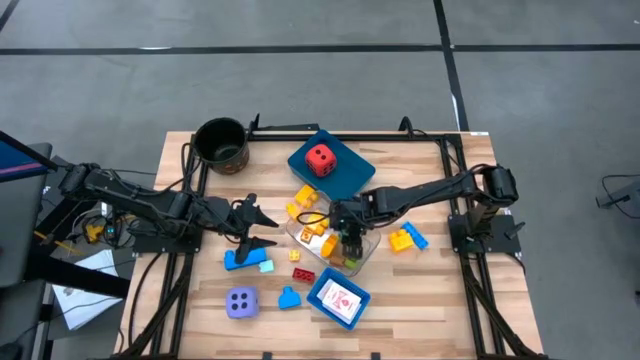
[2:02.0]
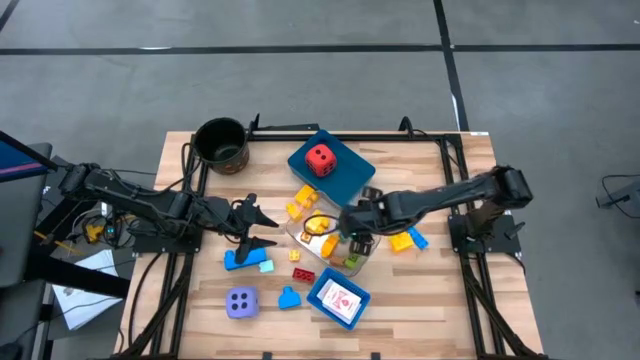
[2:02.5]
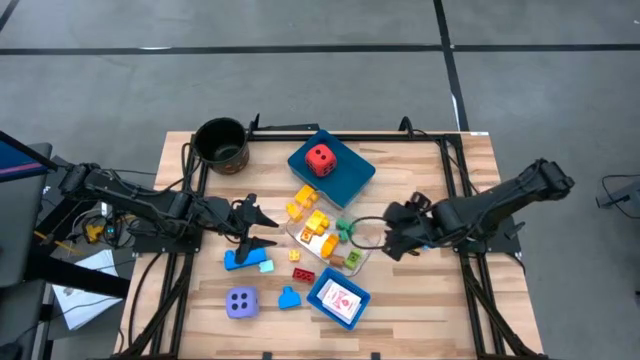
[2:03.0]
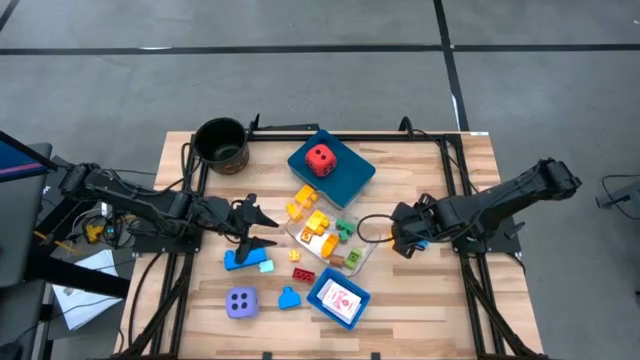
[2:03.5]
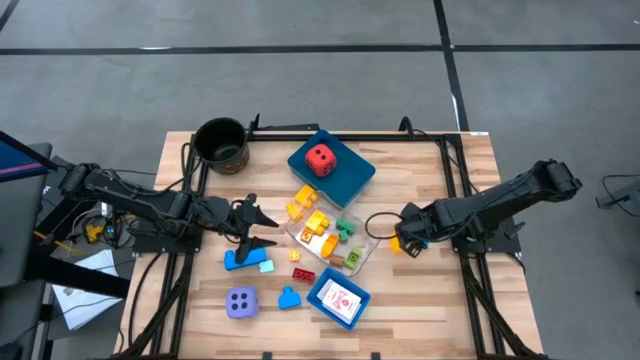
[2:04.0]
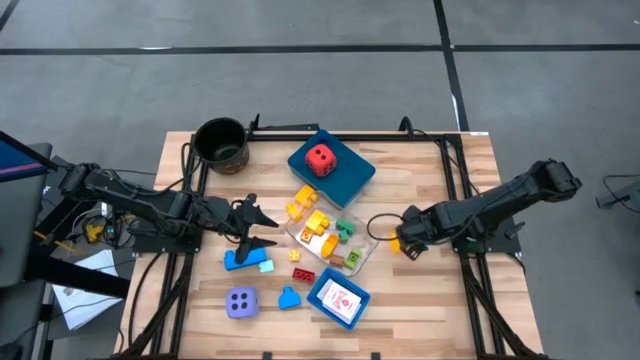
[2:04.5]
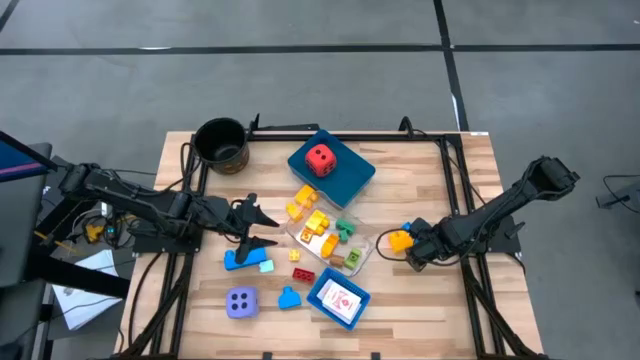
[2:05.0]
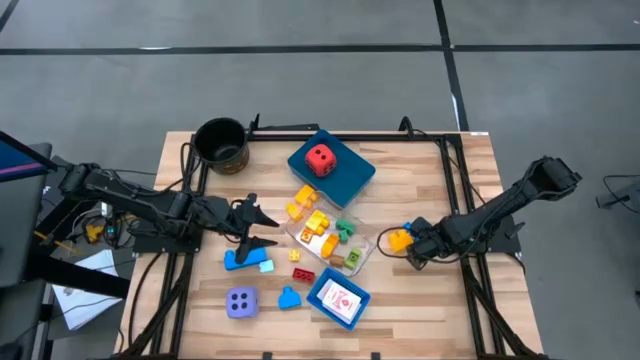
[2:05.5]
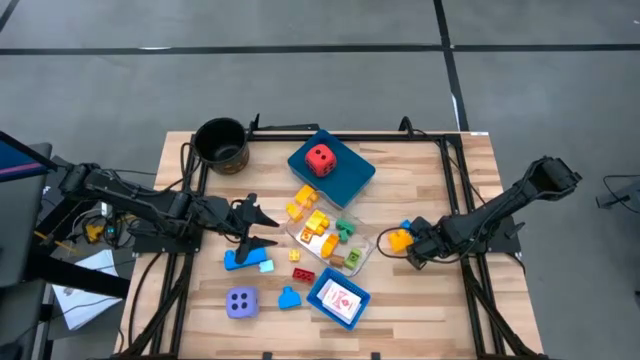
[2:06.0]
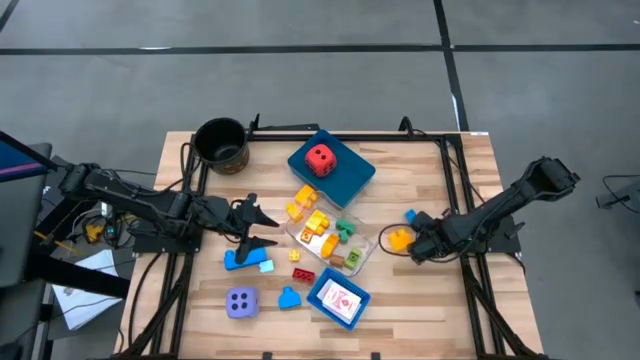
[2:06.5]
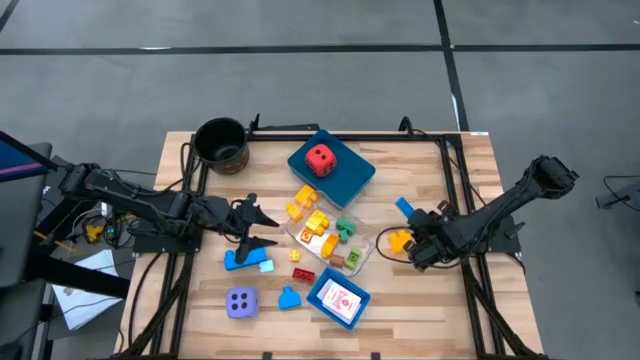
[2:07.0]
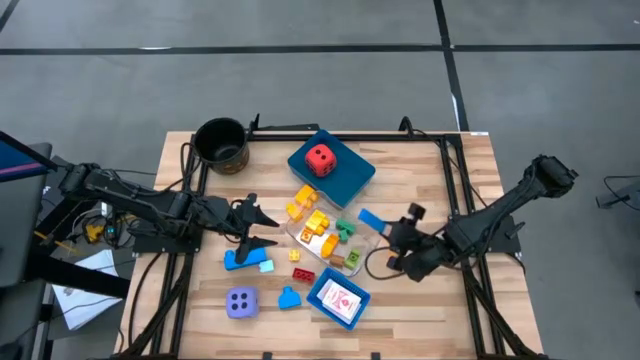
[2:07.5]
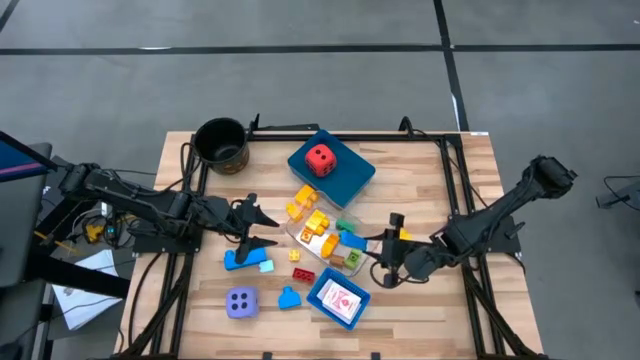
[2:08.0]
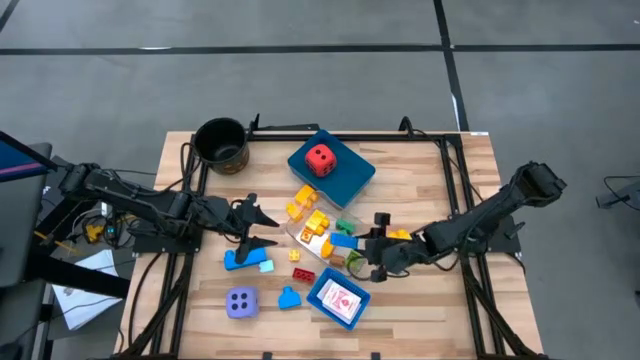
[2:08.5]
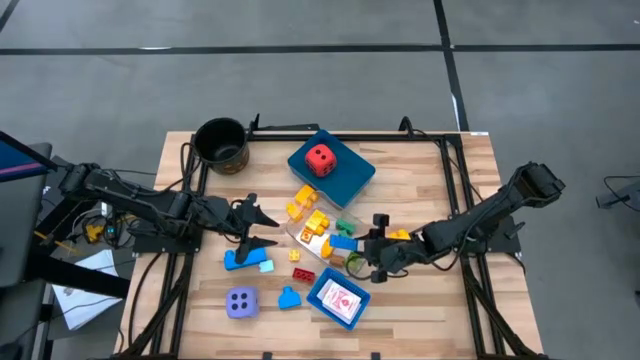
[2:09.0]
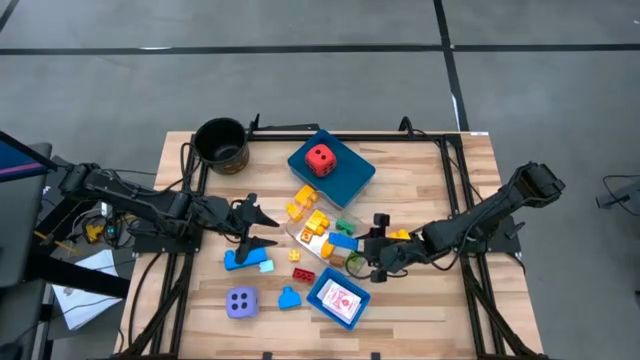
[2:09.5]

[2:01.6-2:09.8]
Task: Pick & Place Toys
Put the blue game piece block into the transparent bin

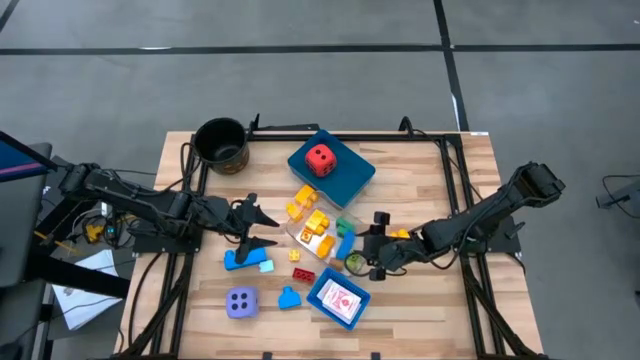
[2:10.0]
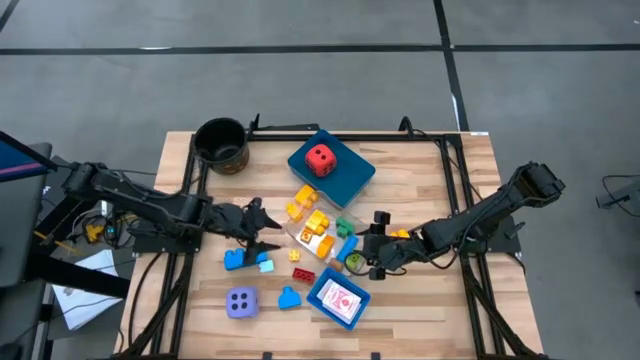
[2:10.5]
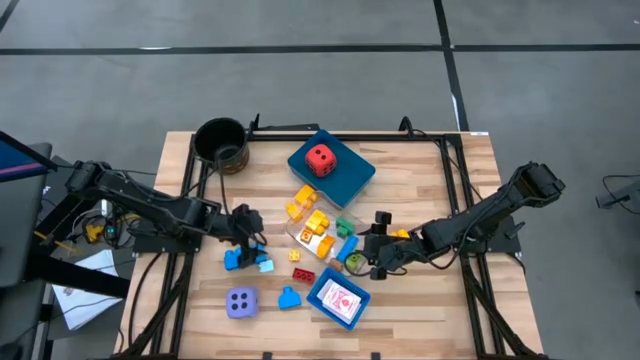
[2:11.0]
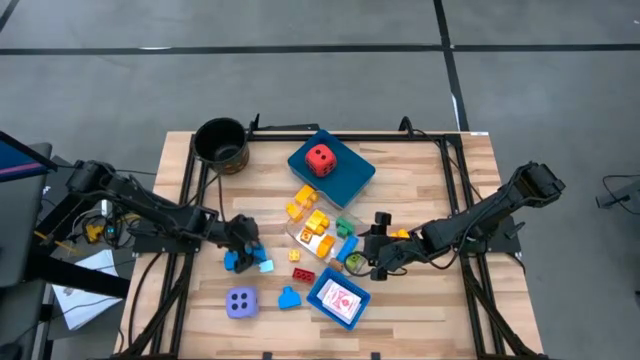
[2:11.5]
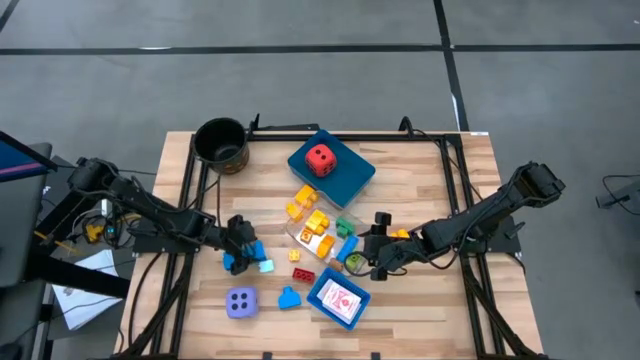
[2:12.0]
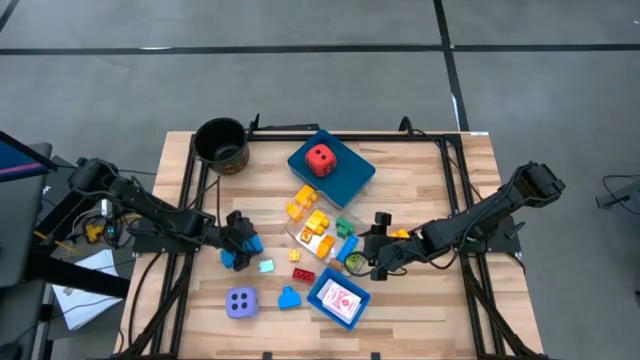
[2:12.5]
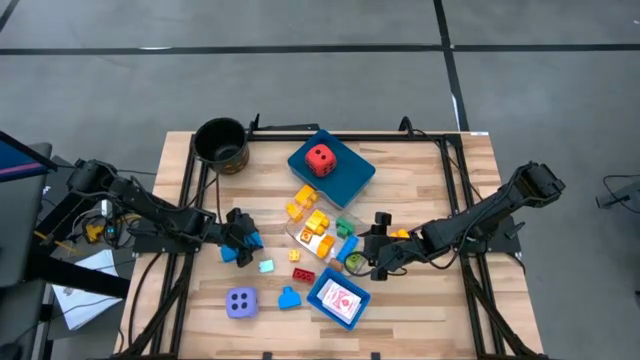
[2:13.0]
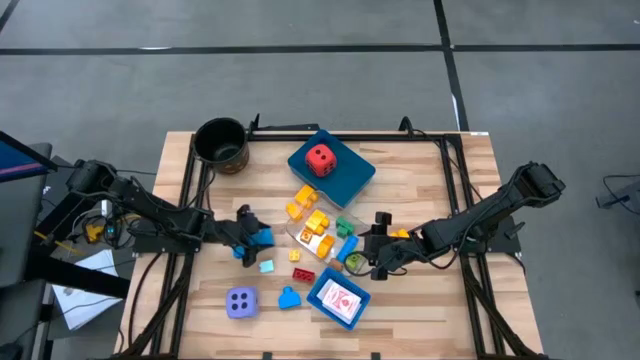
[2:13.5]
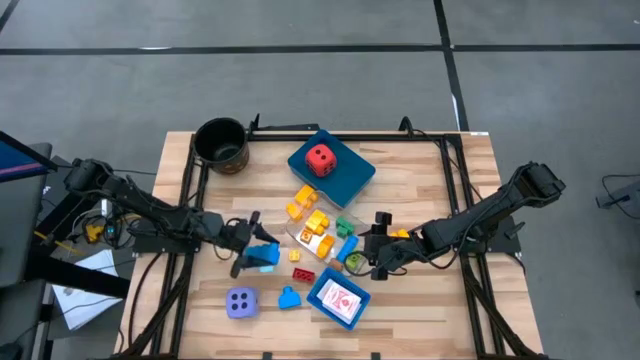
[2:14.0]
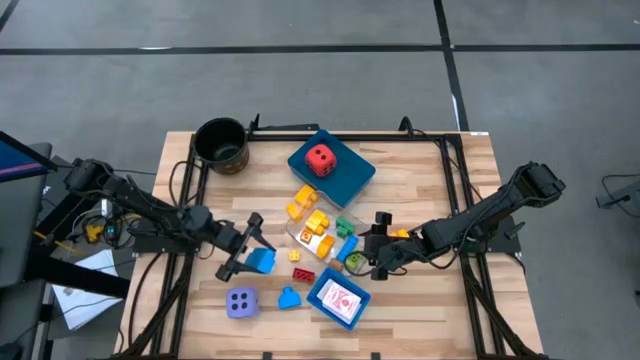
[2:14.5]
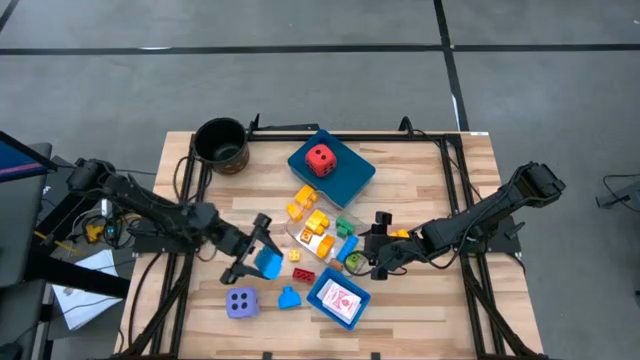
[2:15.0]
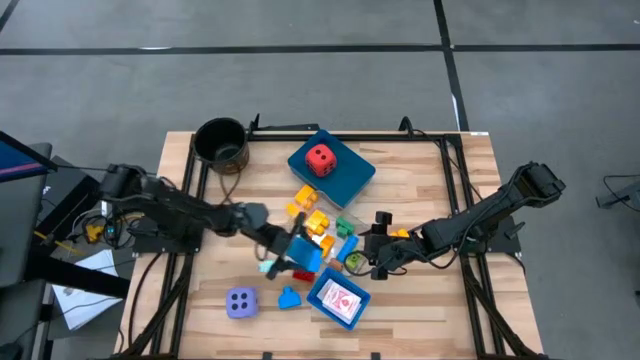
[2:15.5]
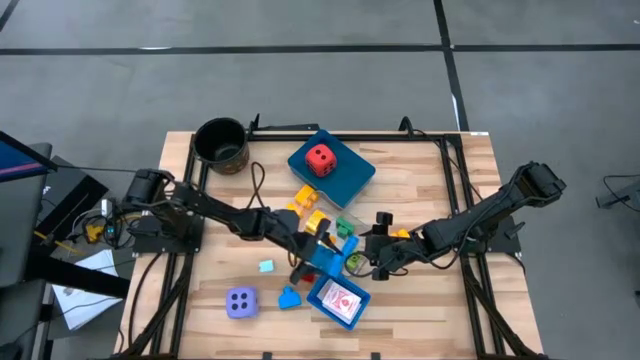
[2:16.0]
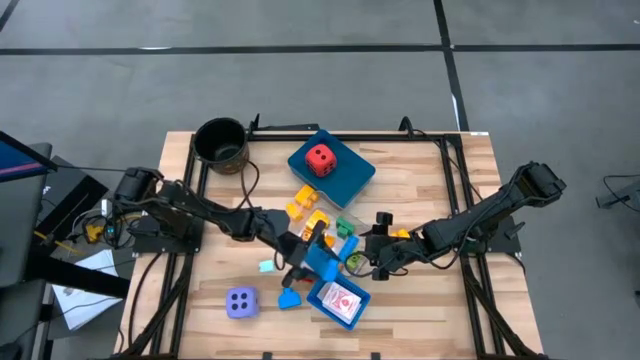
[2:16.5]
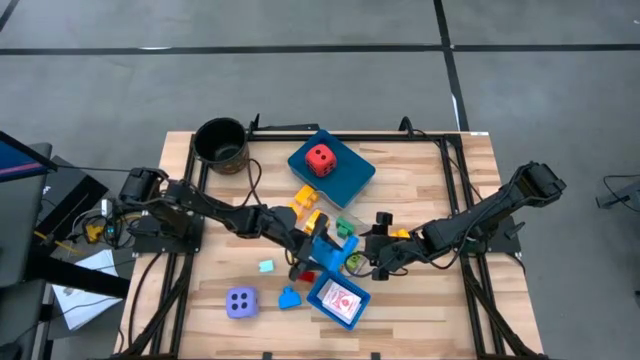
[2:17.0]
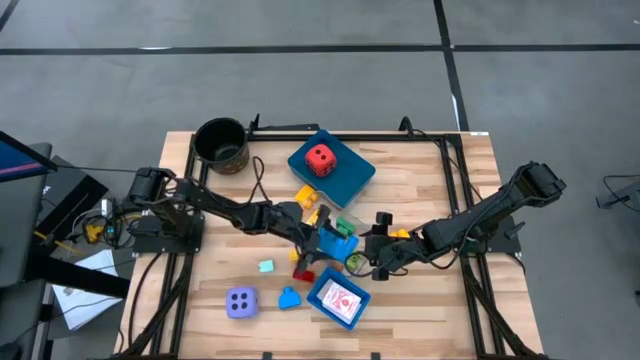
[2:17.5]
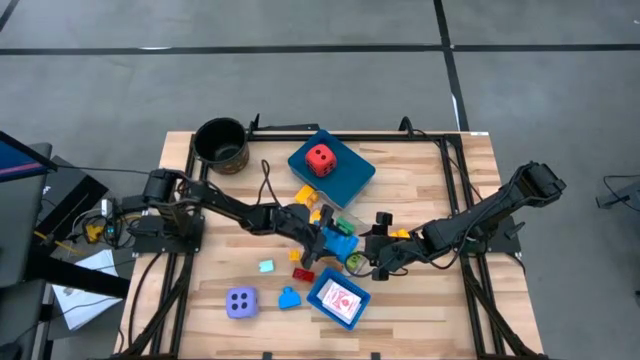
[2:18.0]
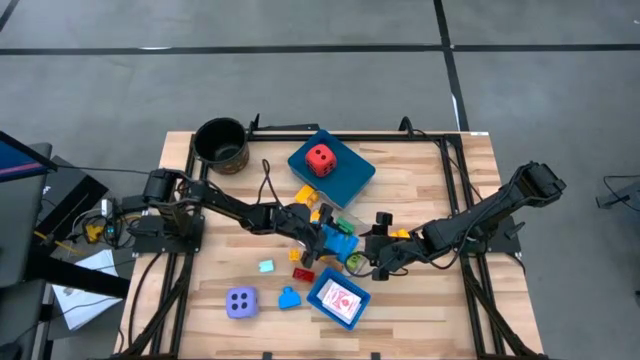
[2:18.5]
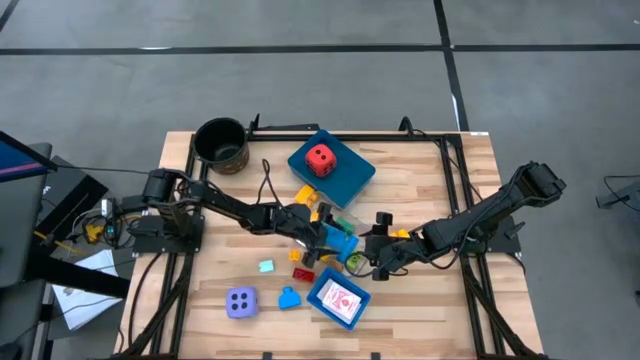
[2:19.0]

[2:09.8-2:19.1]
Put the sky blue game piece block into the transparent bin

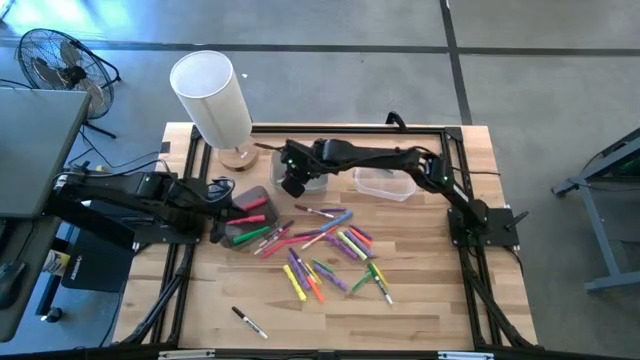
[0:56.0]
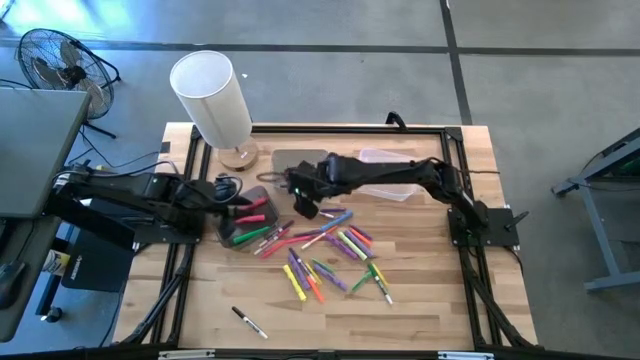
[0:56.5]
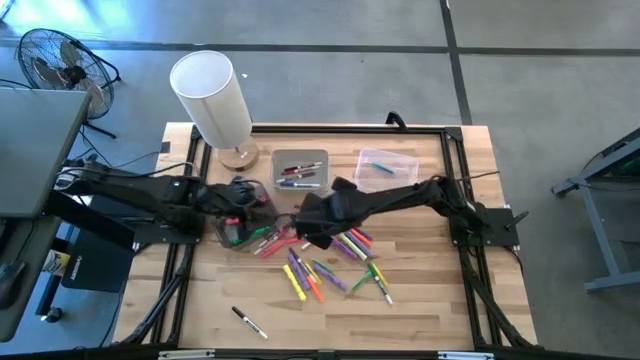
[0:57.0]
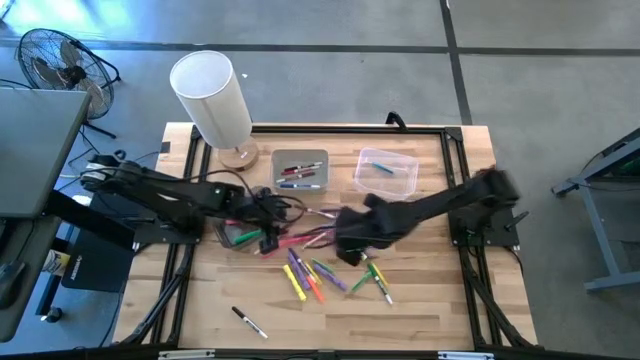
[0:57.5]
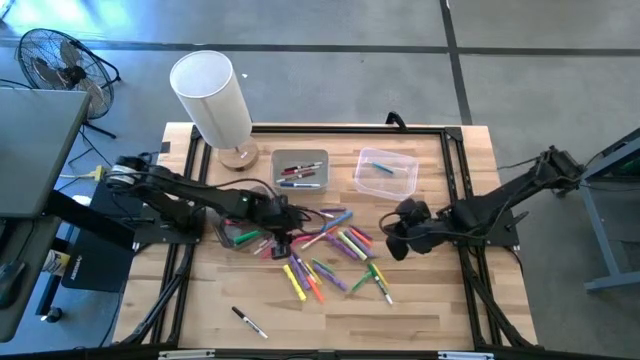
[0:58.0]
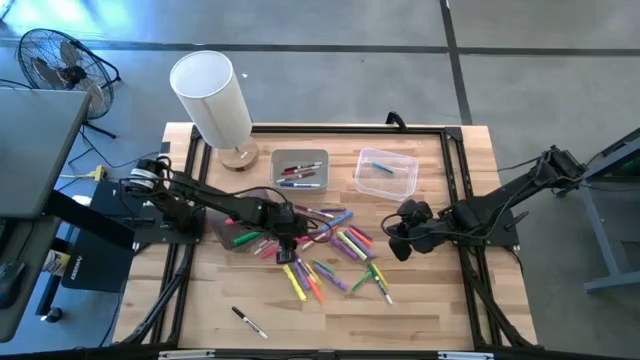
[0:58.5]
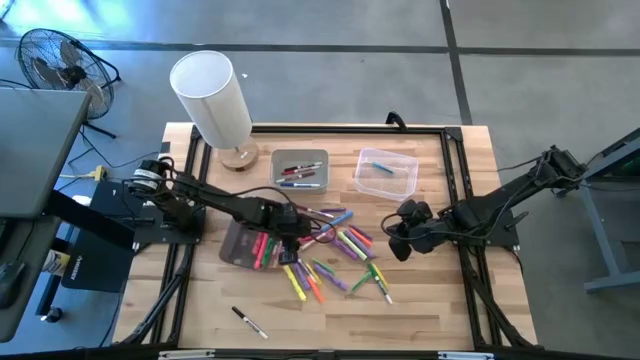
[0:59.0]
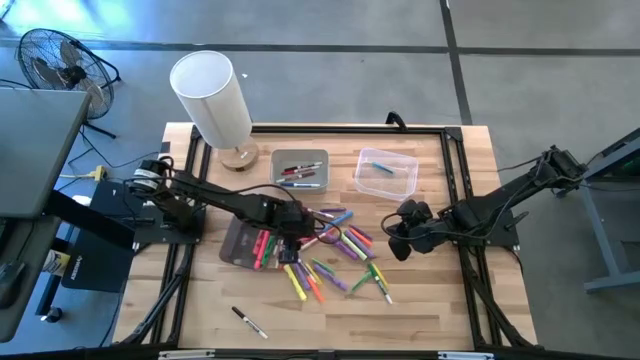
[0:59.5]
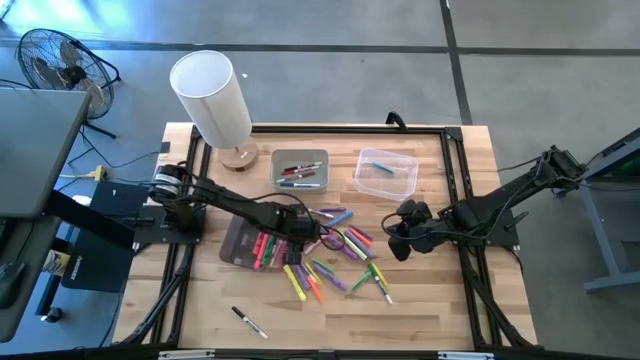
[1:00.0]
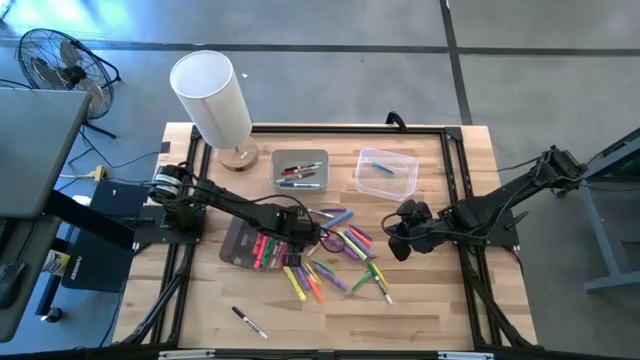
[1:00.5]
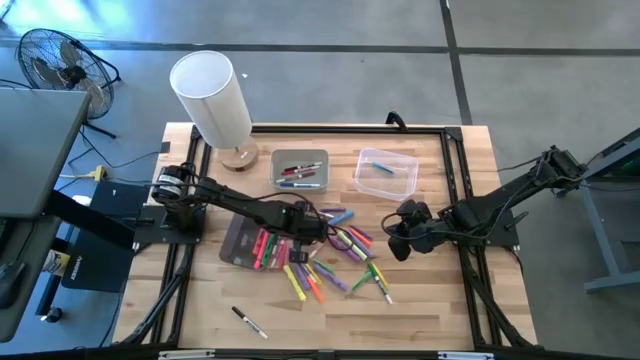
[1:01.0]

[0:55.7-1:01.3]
Task: Pick & Place Markers
Put the pink pen into the transparent bin
